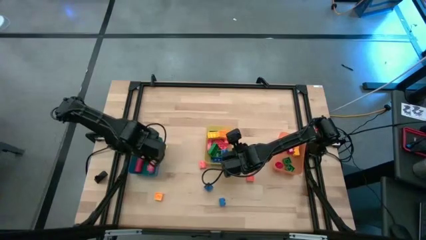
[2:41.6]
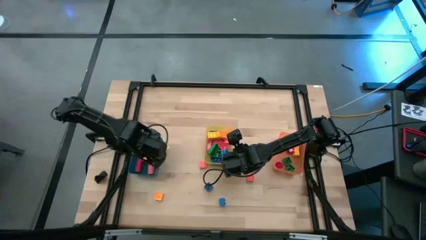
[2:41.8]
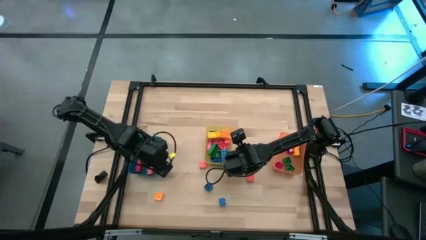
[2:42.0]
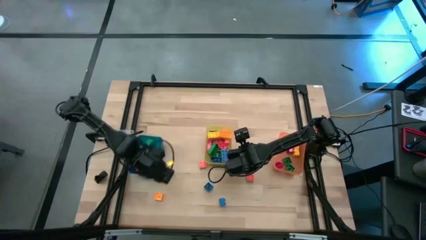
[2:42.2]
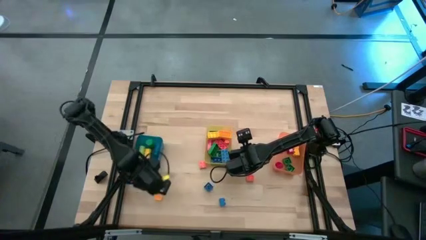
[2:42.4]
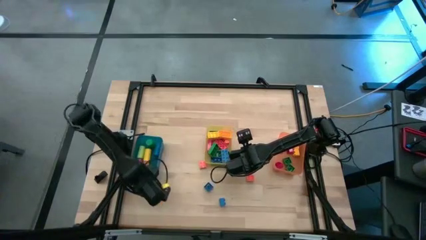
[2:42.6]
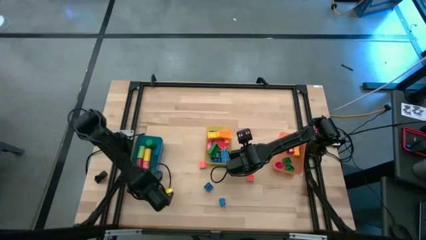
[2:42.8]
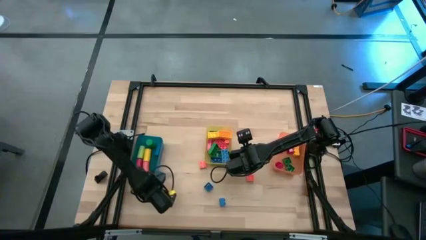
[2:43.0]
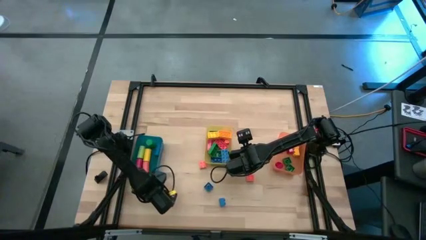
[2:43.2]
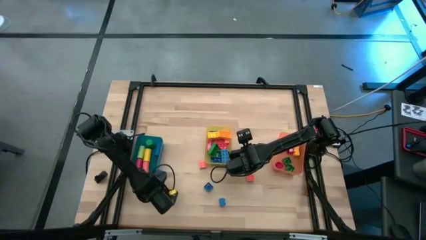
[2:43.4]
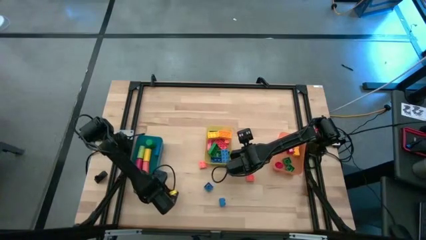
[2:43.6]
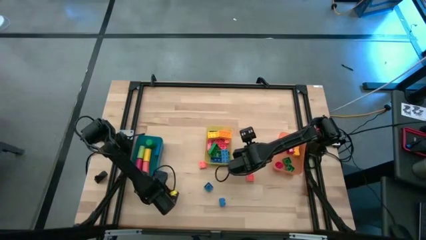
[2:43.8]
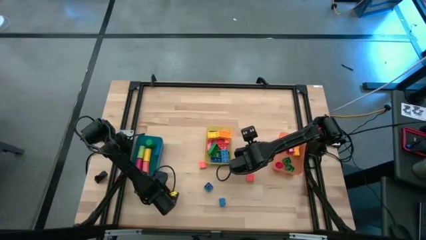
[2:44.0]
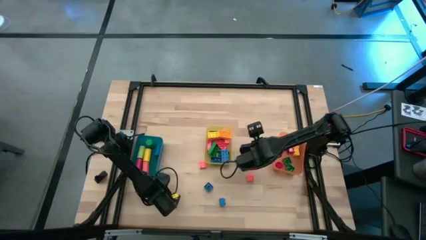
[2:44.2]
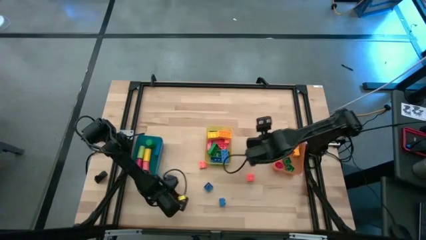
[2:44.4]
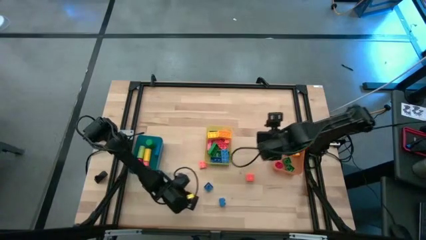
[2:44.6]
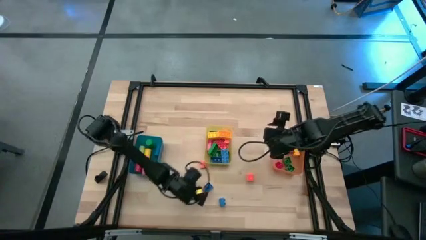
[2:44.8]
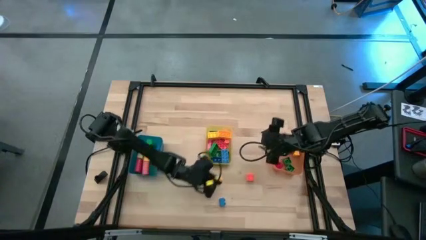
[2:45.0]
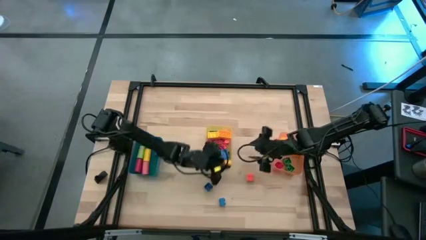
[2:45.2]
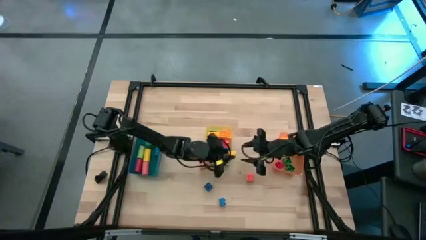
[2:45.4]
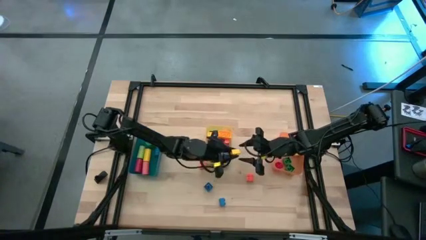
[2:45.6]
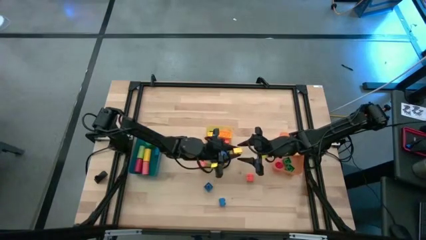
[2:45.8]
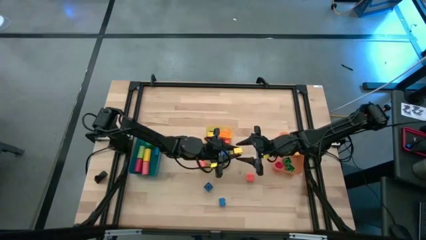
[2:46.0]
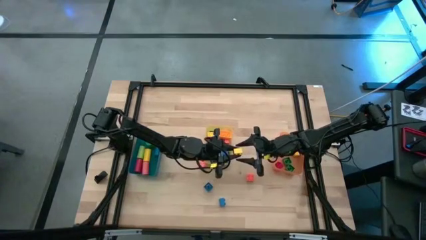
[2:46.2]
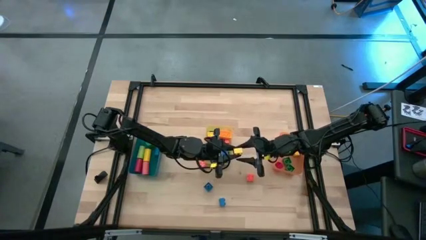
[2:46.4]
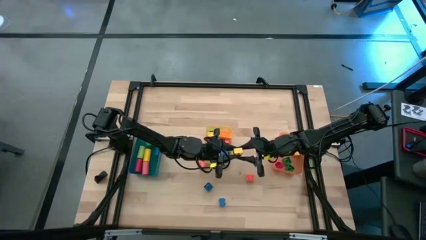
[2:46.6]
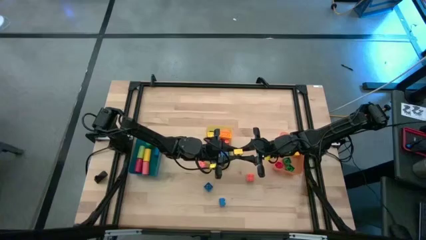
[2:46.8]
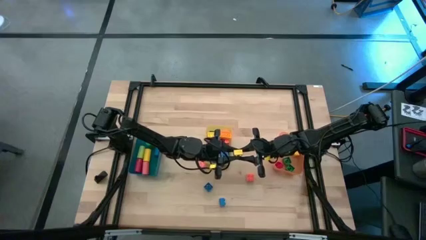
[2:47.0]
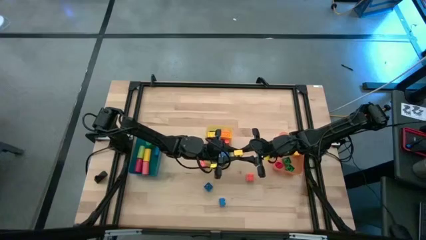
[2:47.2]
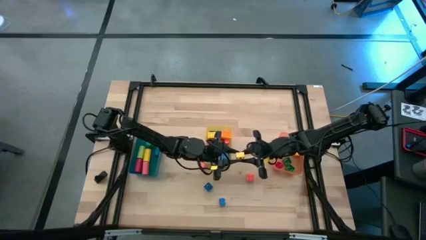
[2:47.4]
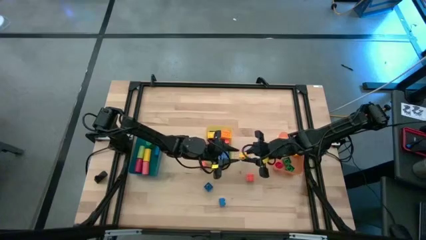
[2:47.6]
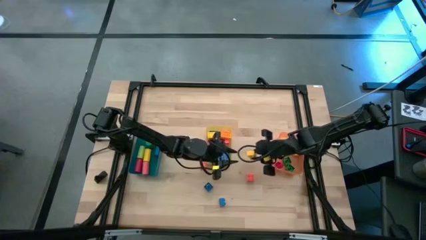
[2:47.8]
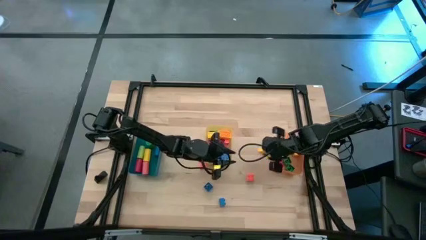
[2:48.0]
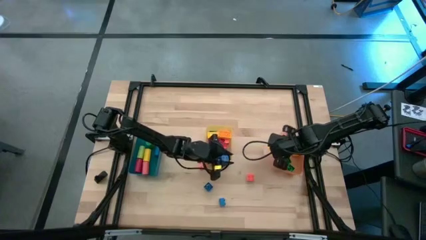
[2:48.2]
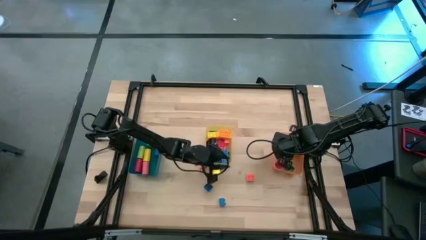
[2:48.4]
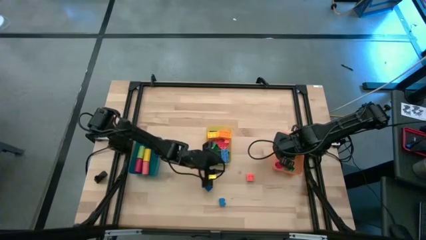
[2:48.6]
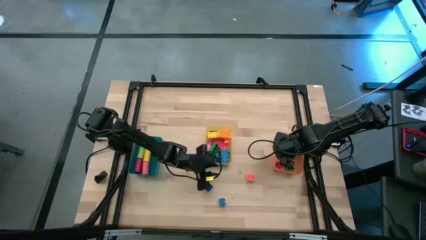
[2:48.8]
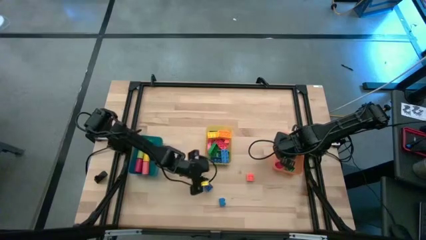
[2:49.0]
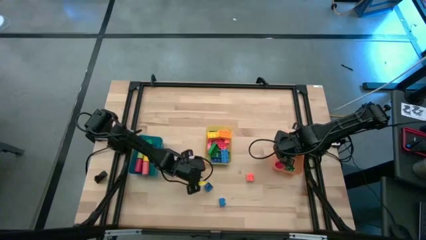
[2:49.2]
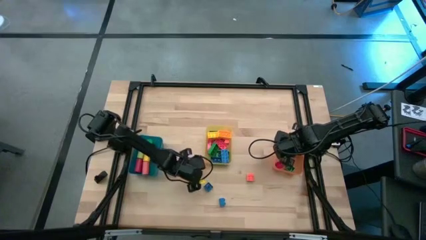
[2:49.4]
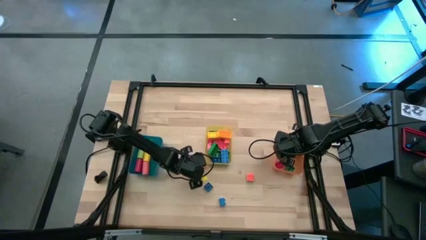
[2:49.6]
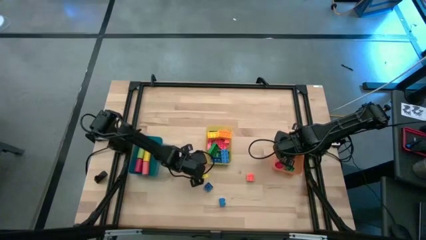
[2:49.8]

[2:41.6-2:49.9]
Task: Sort blocks by size
Put the yellow 4 stud game piece into the orange bin

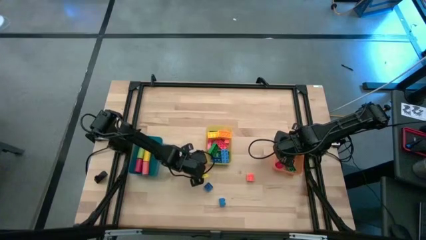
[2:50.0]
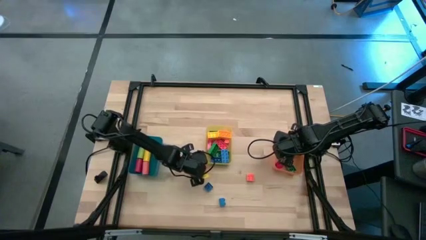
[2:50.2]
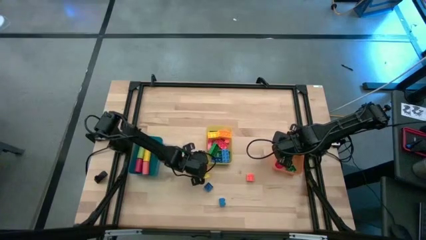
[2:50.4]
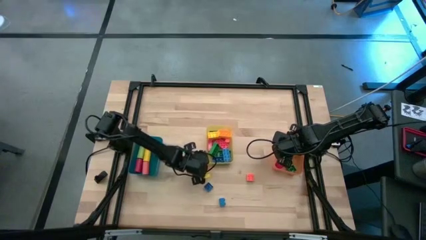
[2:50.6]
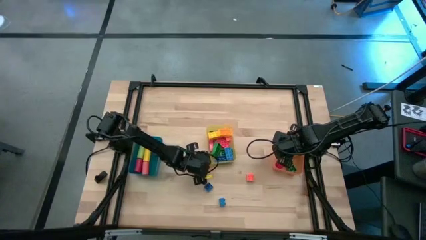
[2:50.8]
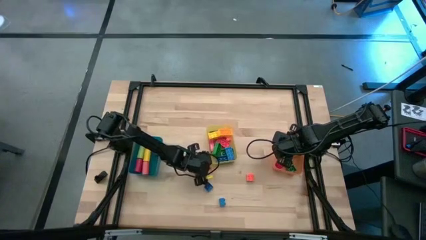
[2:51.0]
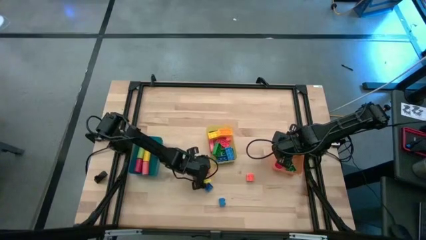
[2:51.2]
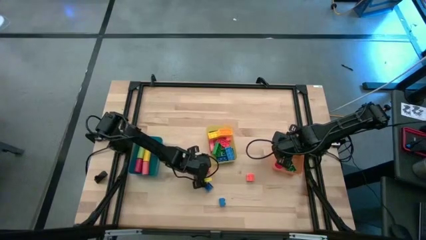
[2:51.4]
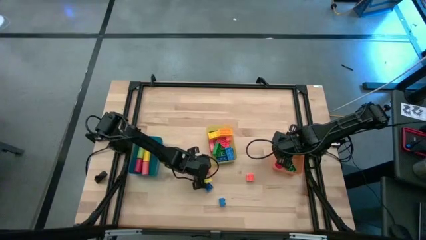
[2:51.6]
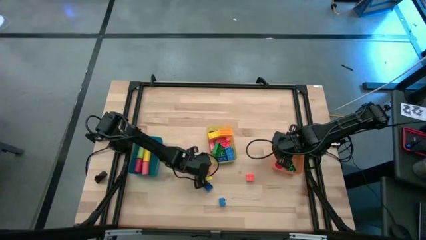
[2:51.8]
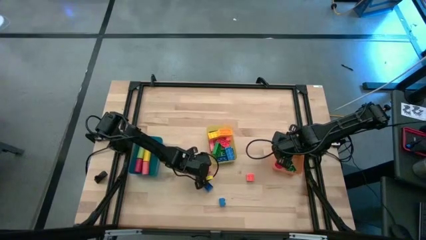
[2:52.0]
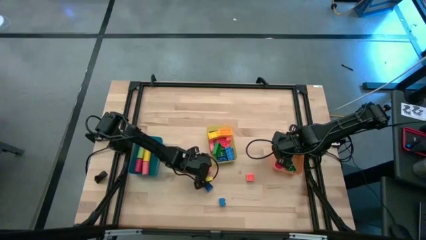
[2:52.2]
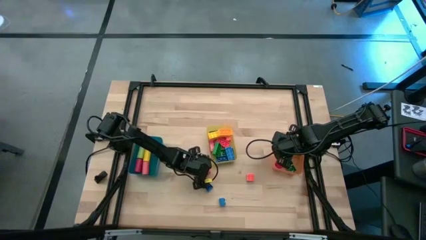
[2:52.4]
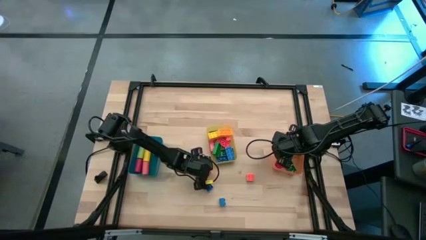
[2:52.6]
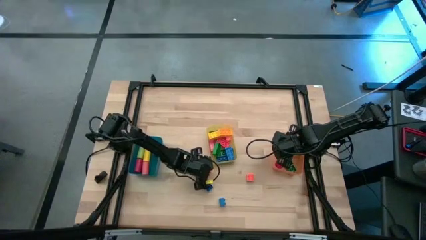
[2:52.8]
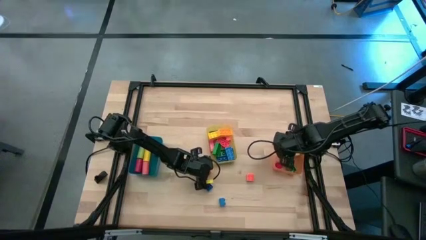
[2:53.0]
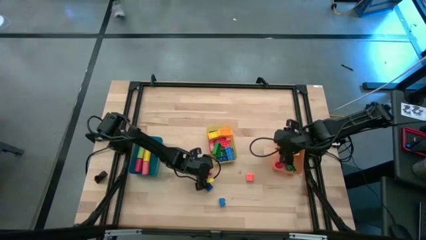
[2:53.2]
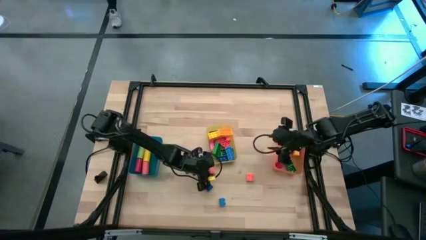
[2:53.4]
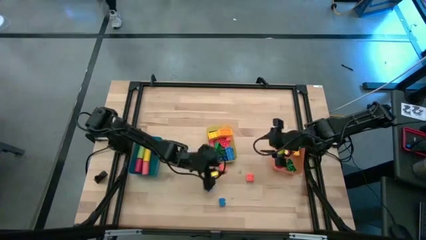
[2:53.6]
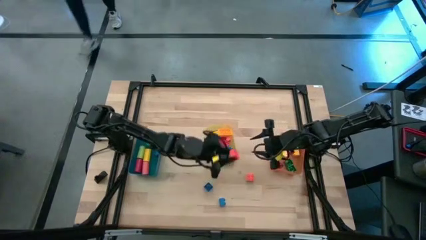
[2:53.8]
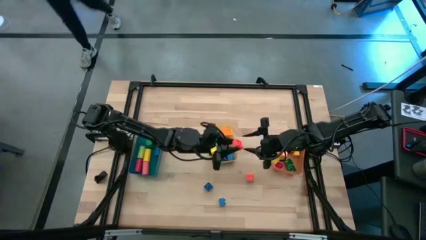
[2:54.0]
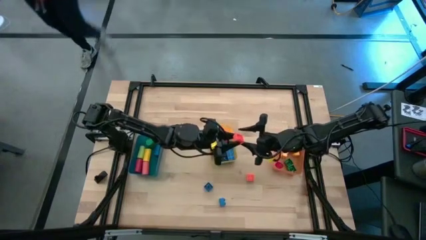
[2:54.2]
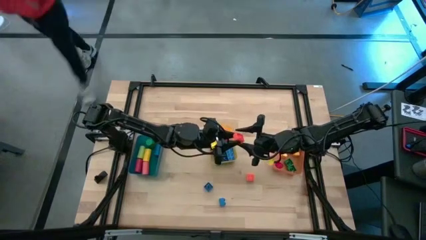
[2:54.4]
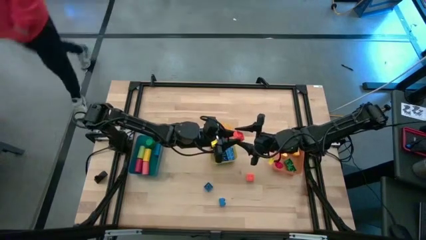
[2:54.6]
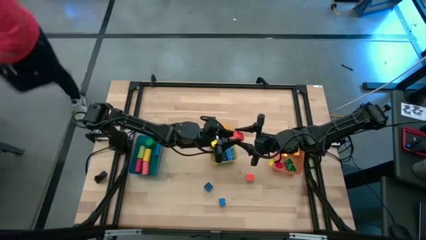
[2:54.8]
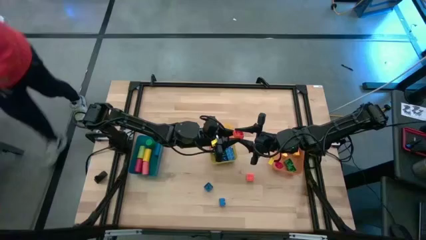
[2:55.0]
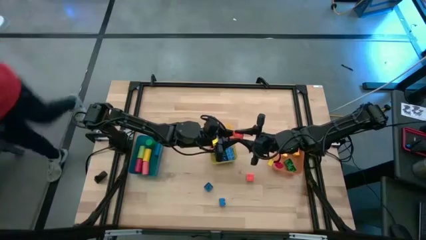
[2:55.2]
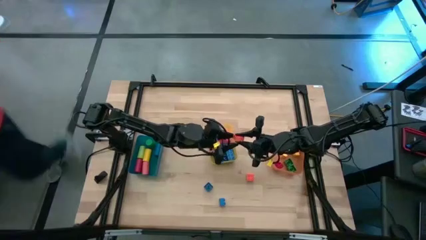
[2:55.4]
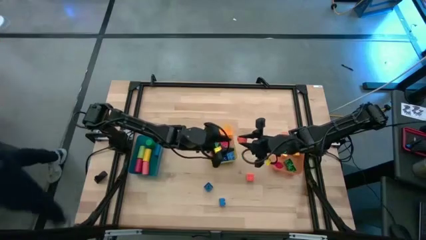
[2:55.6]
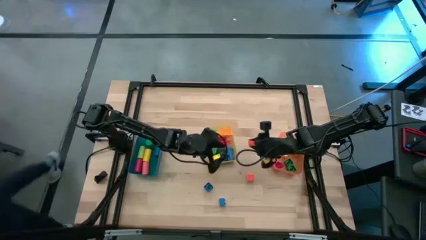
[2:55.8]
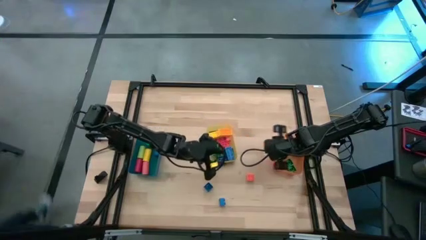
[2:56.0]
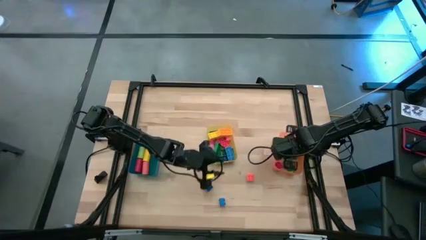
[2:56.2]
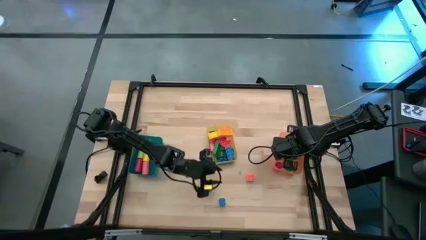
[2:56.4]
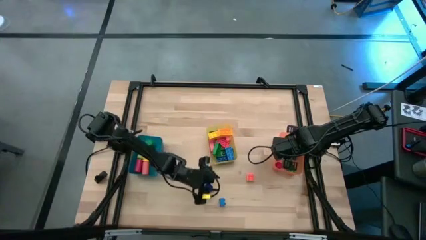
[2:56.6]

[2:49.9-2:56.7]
Put the orange 4 stud game piece into the orange bin
